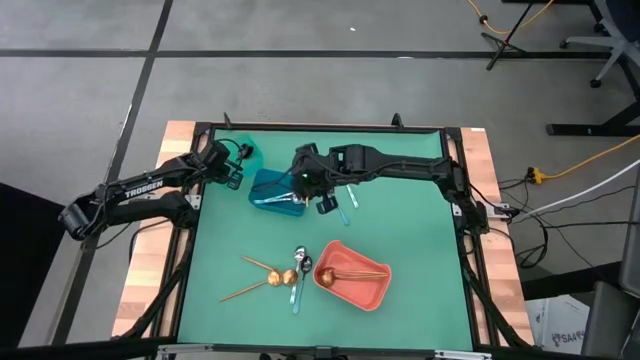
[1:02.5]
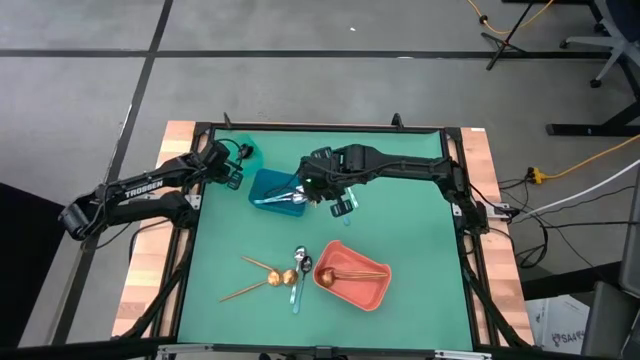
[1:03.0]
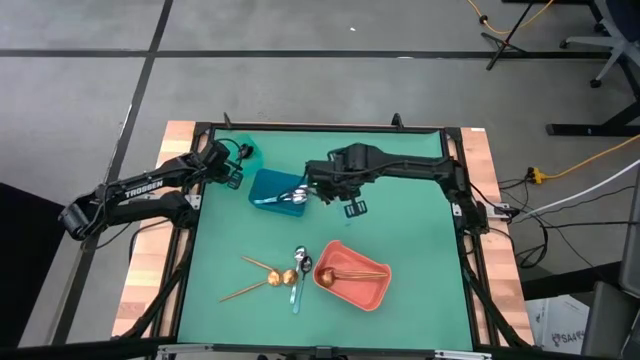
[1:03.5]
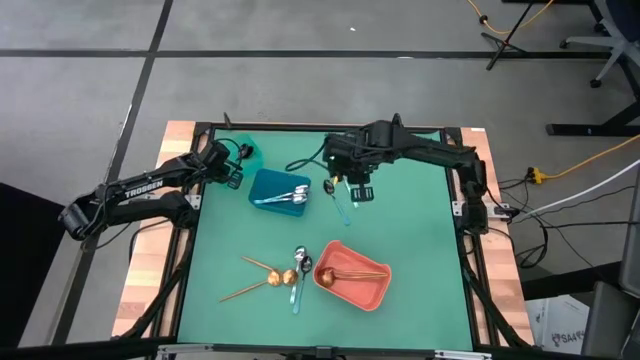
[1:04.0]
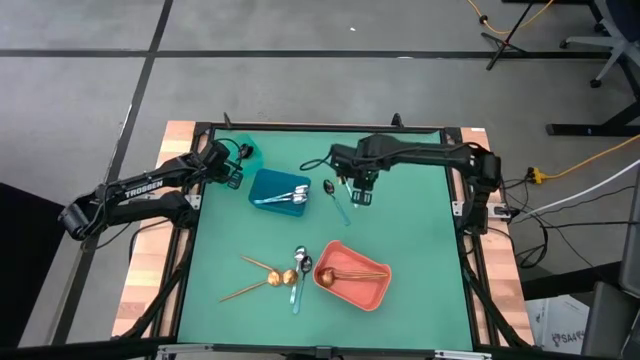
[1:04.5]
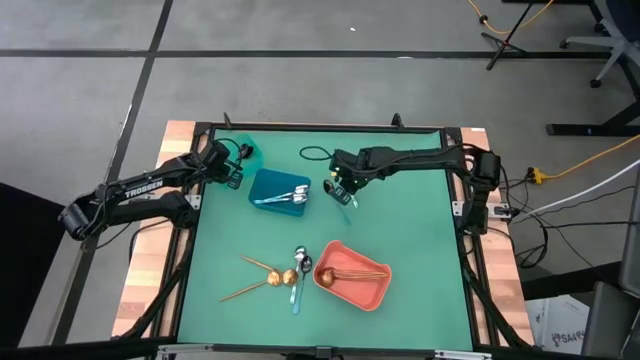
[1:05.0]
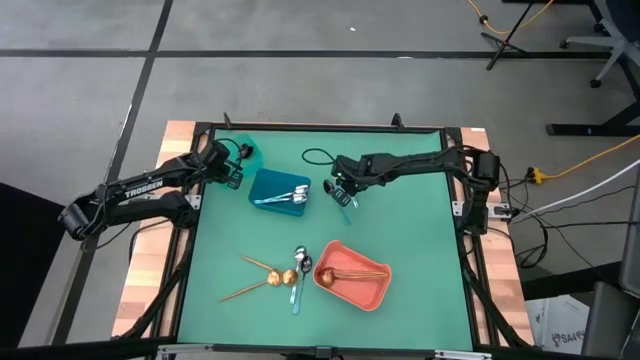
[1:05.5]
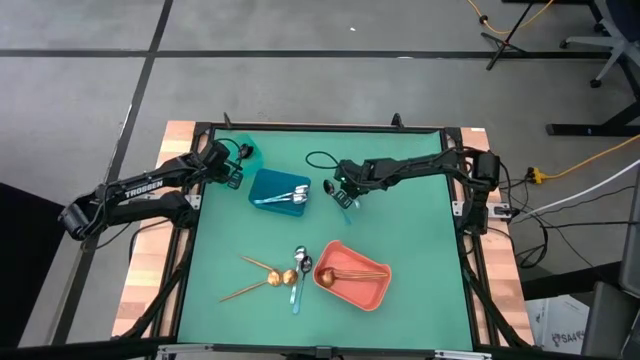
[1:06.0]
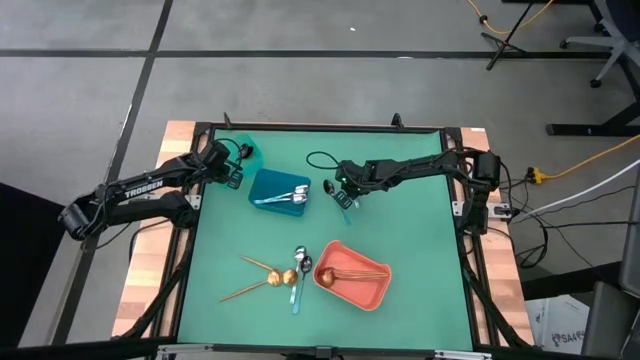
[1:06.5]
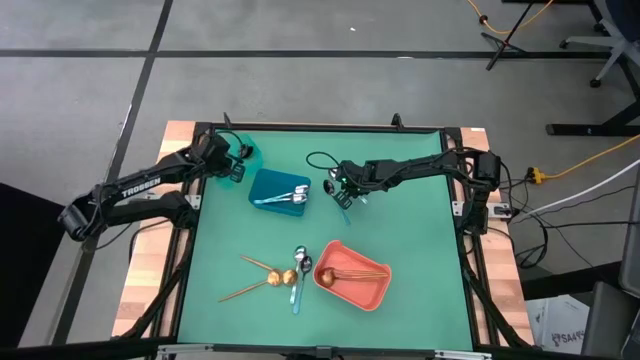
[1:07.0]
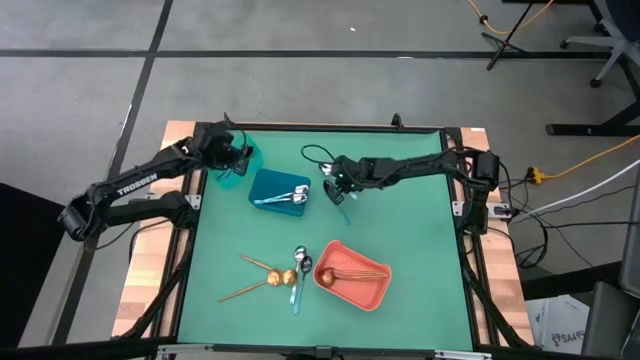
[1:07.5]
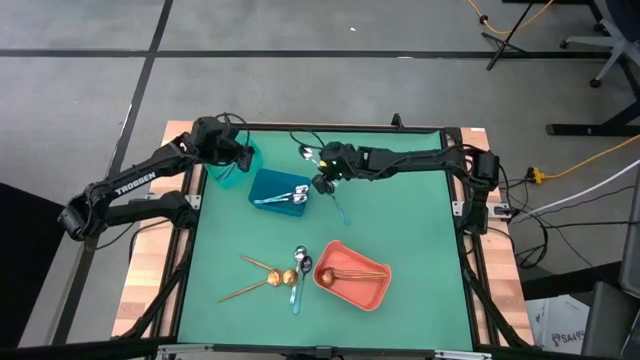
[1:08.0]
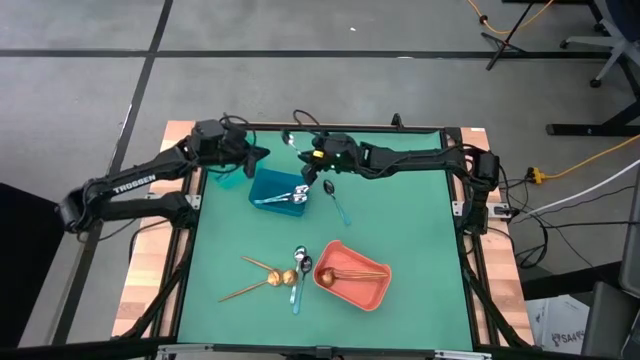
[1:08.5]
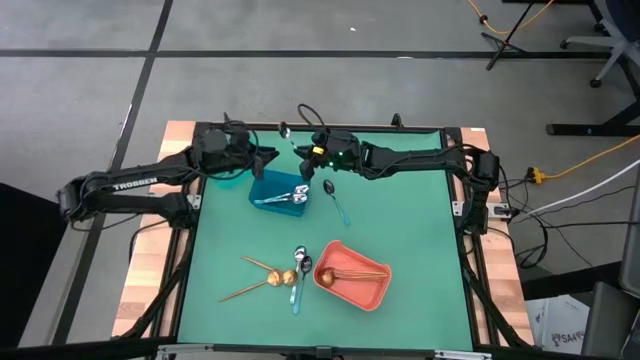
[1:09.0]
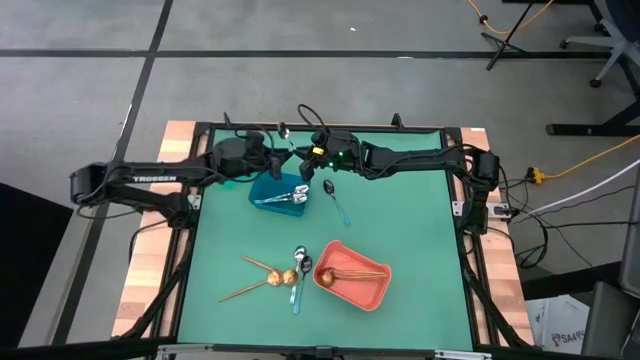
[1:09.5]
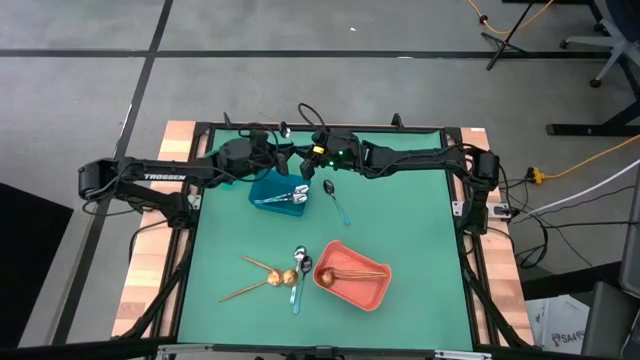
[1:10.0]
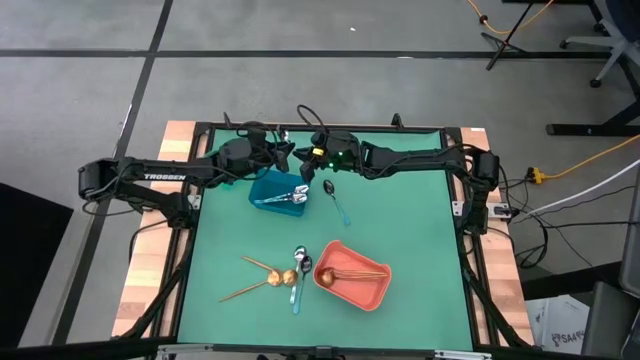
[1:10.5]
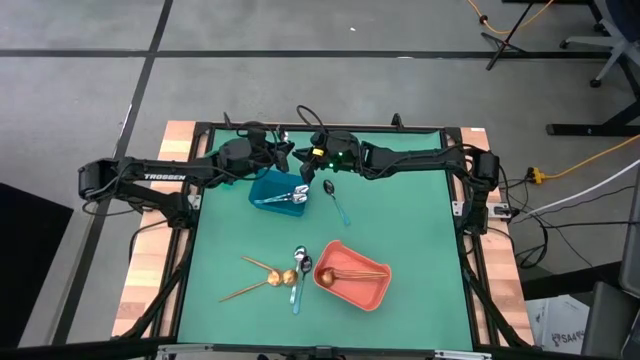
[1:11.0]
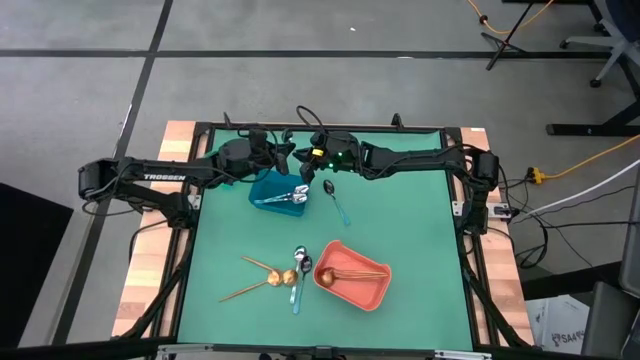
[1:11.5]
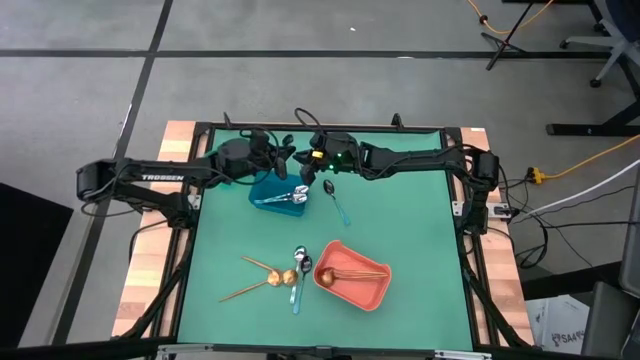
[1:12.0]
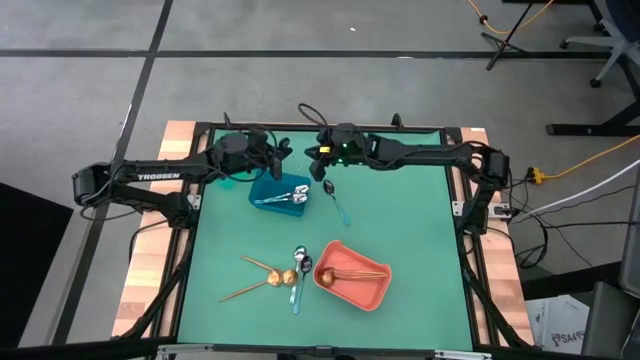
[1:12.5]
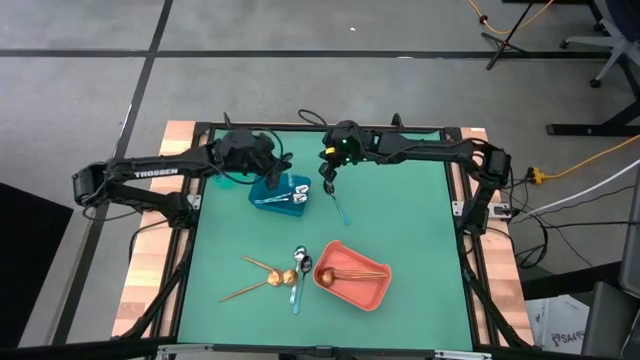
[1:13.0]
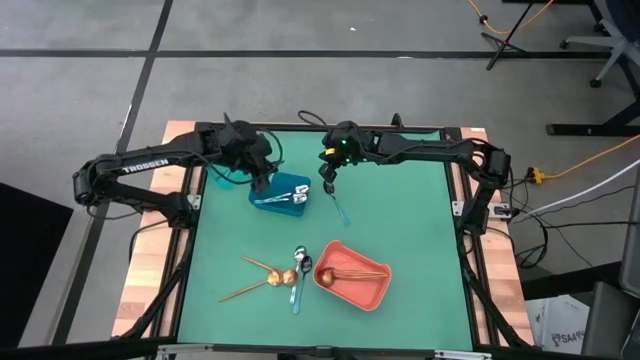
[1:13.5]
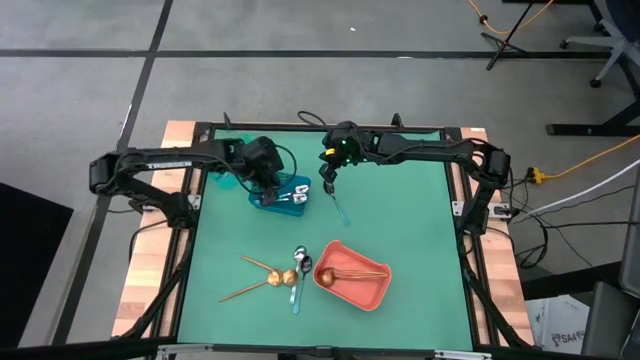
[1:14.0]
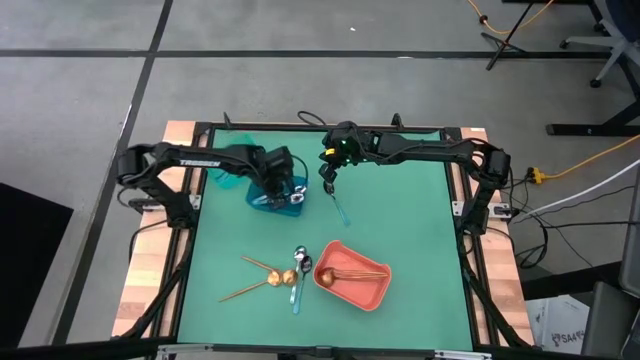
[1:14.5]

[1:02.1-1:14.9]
Task: Sort silverware by color (type)
Put the patterned blue spoon into the blue bin

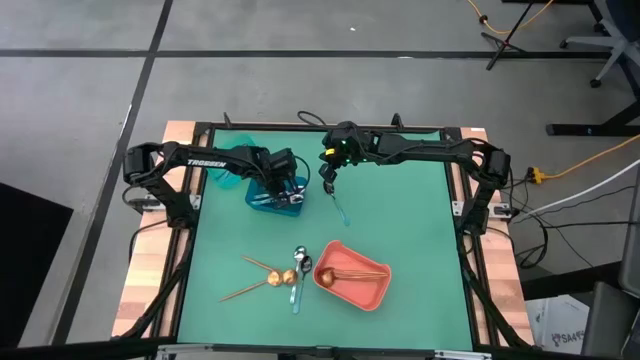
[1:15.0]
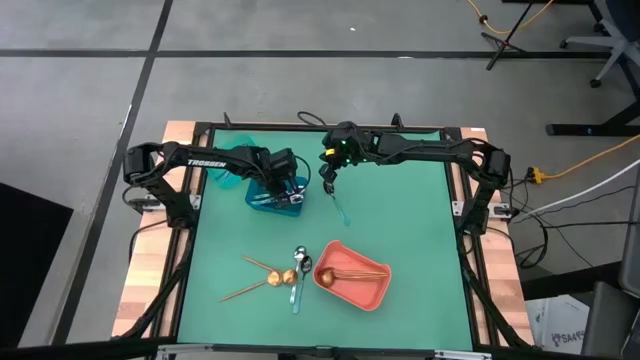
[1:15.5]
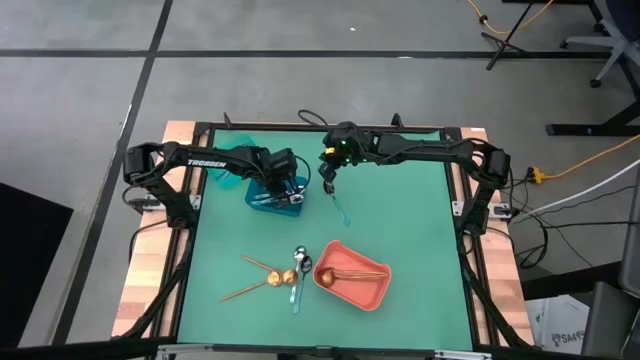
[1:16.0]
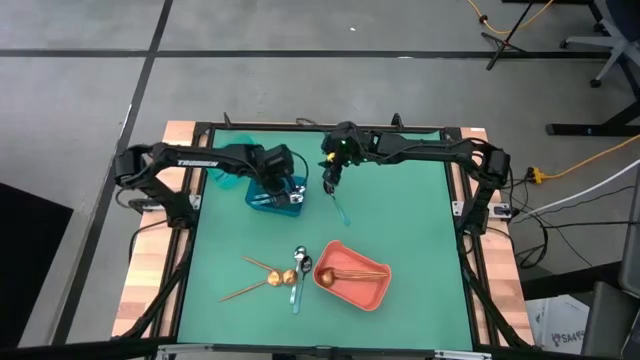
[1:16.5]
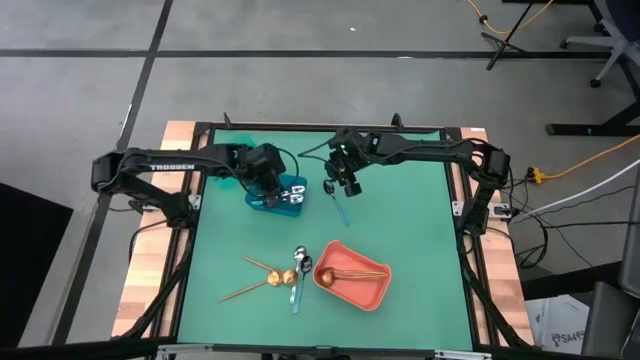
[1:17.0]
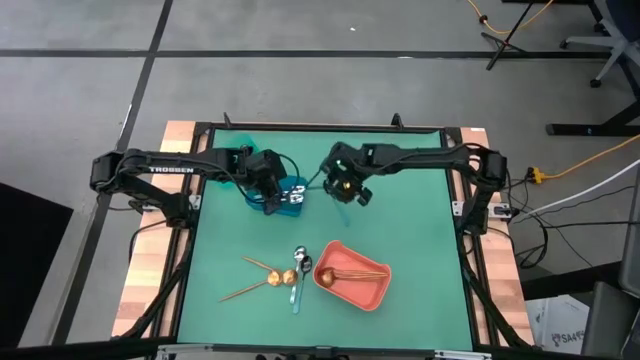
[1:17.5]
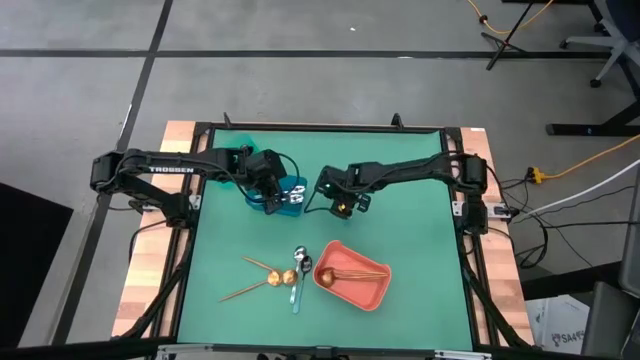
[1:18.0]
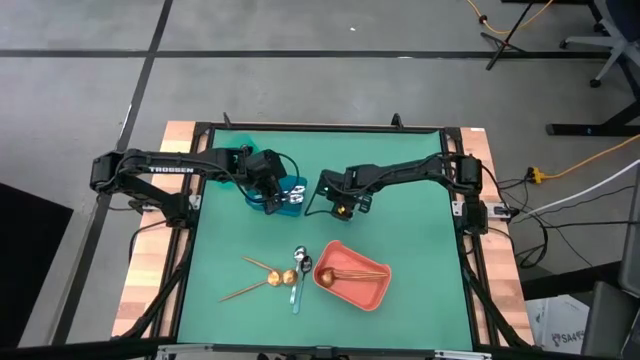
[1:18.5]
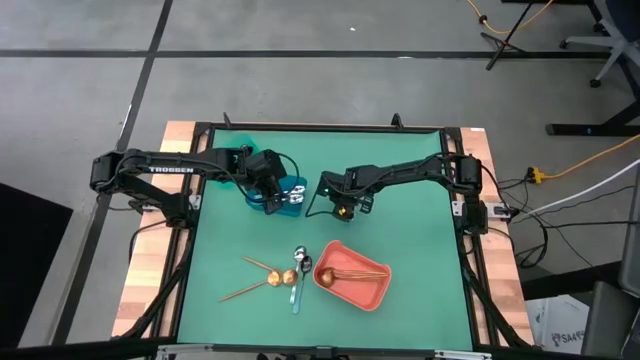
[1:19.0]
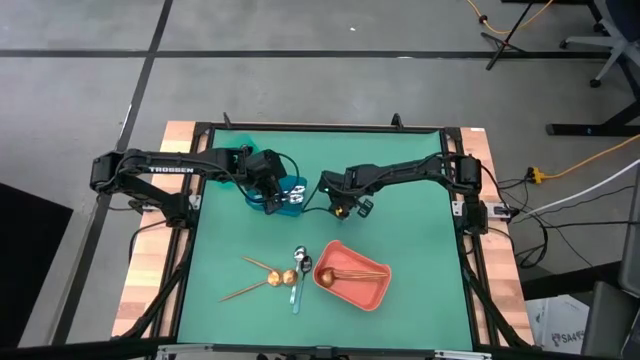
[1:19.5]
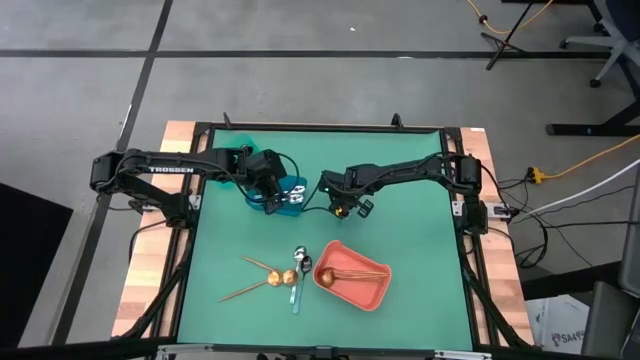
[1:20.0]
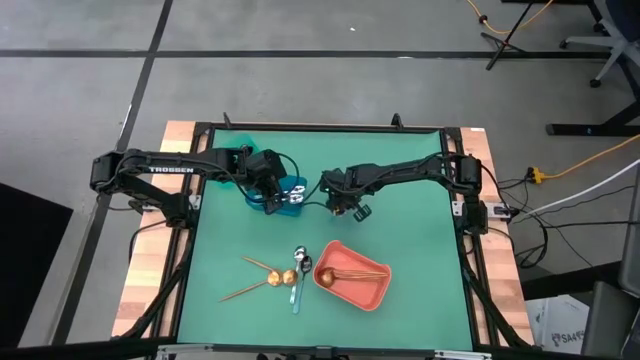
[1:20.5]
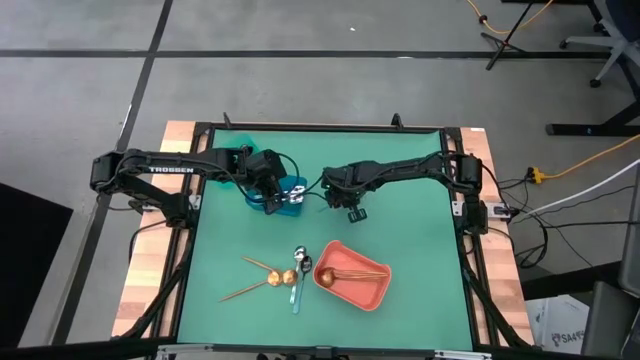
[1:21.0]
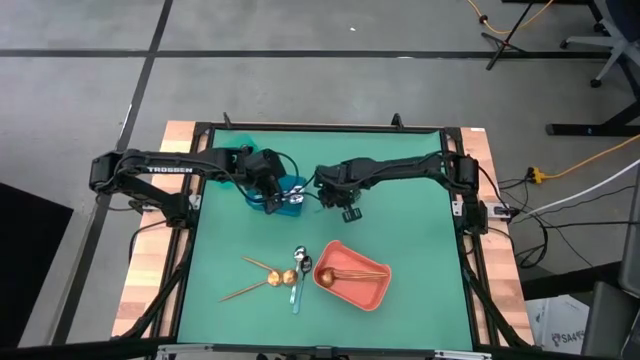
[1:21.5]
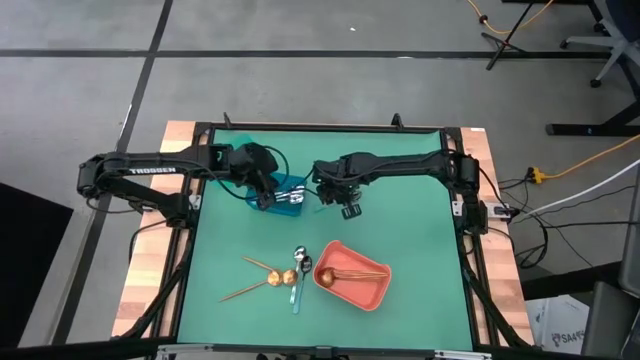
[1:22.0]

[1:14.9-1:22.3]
Put the blue spoon into the transparent green bin

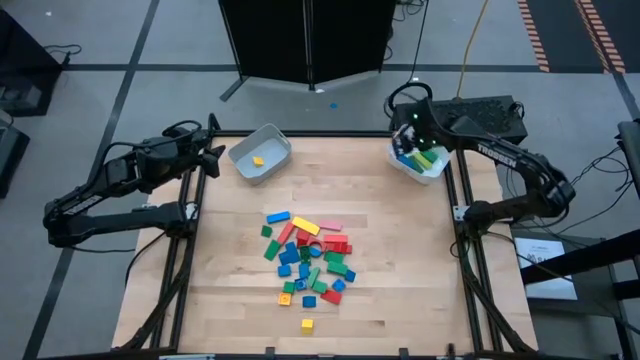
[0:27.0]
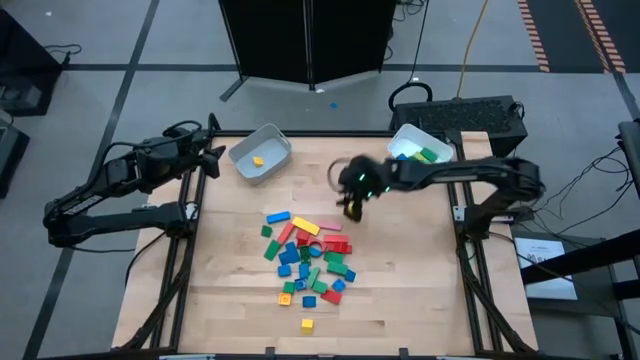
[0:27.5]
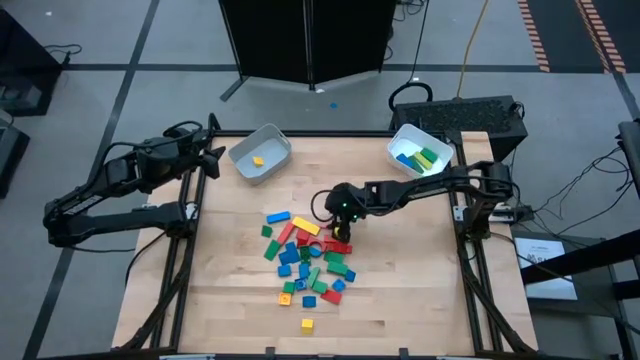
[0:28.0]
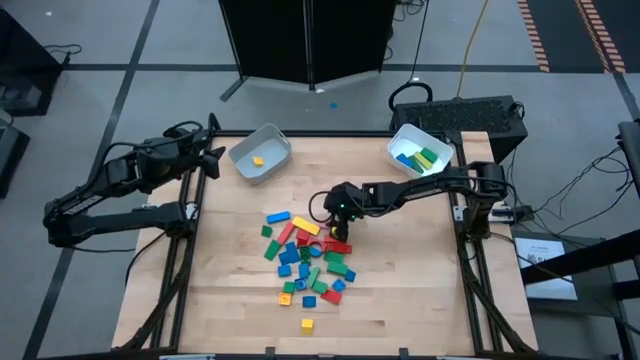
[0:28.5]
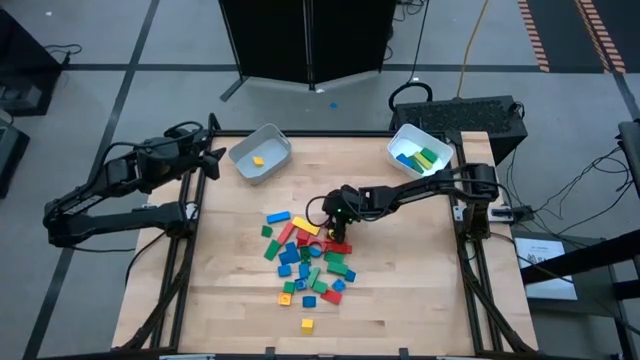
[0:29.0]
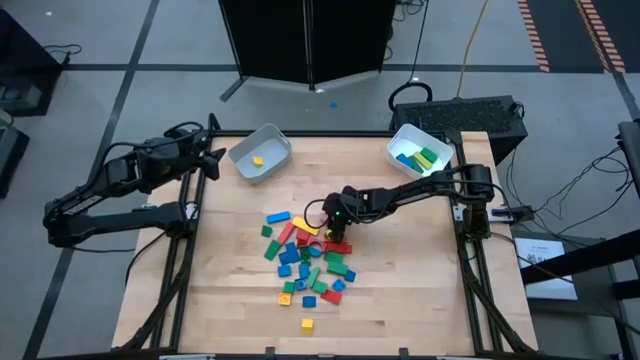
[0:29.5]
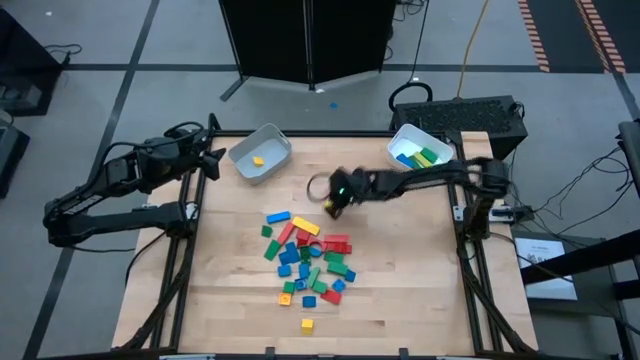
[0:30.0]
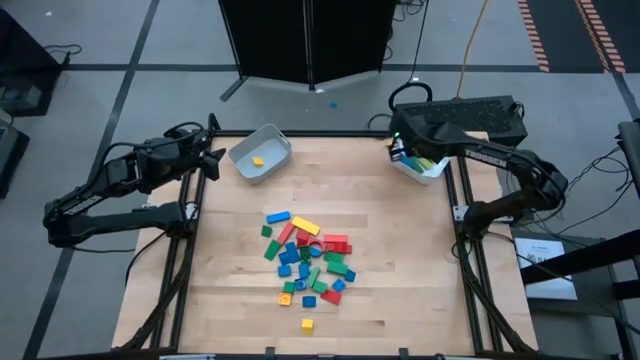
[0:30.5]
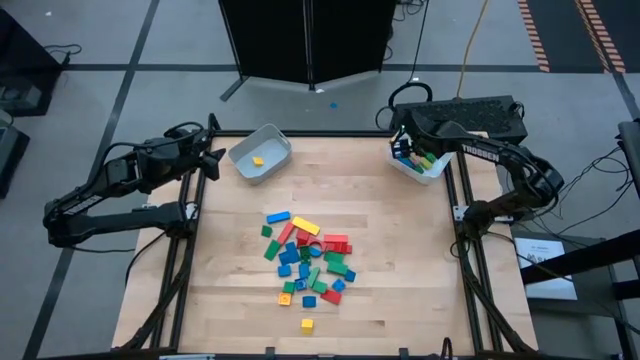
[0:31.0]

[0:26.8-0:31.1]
Task: Sort blocks by size
Put the rectangular pink block into the white bin
